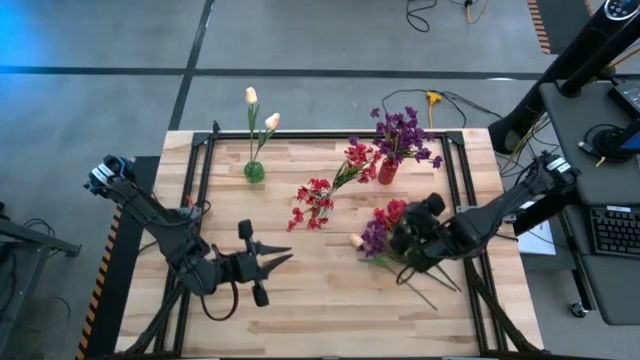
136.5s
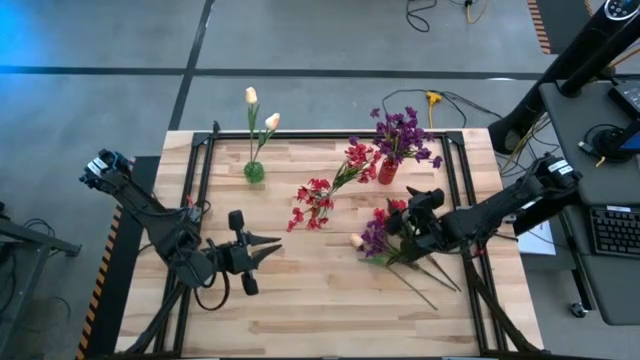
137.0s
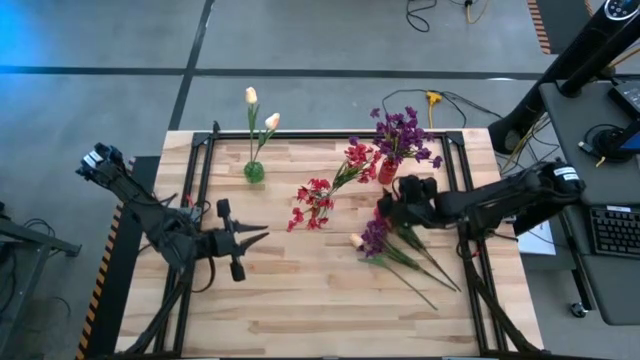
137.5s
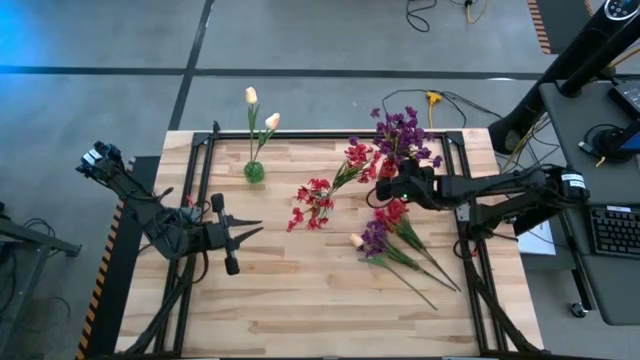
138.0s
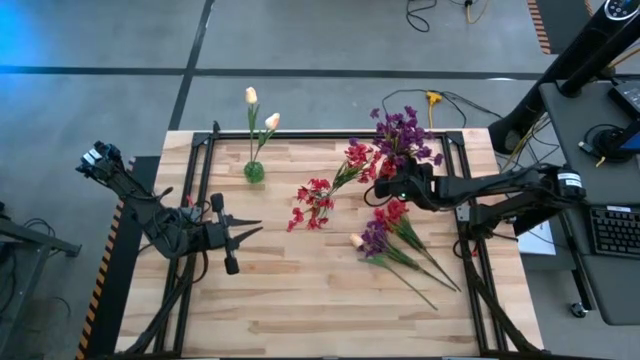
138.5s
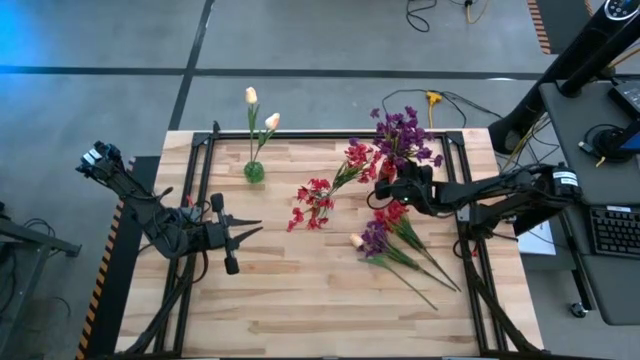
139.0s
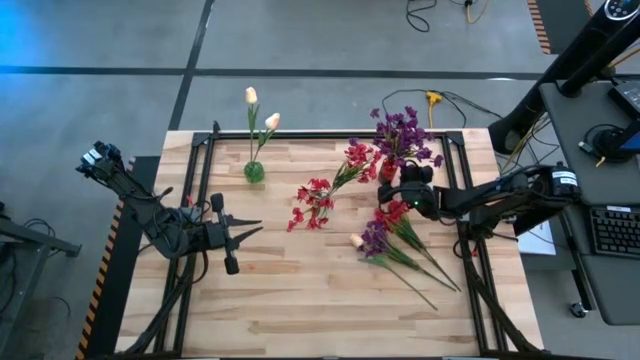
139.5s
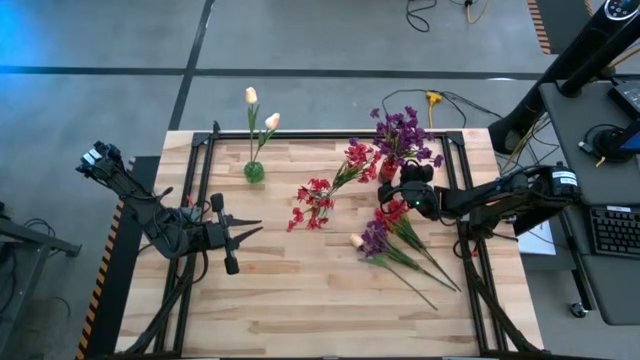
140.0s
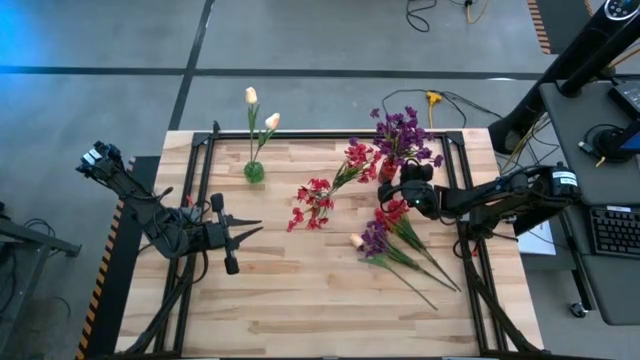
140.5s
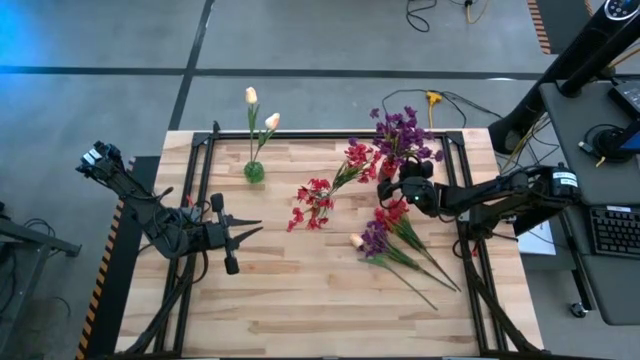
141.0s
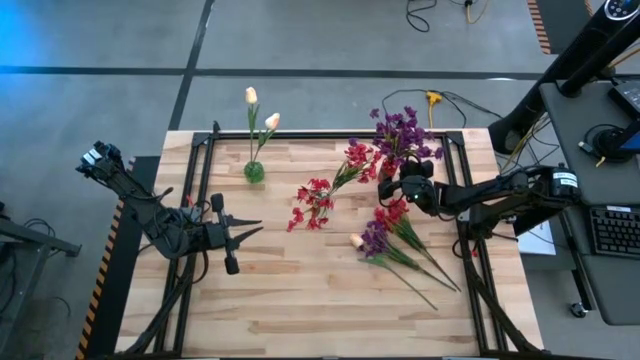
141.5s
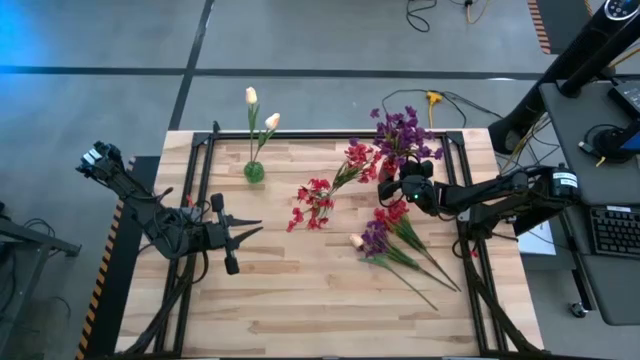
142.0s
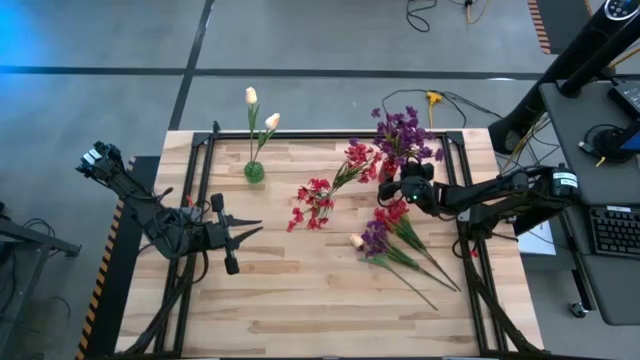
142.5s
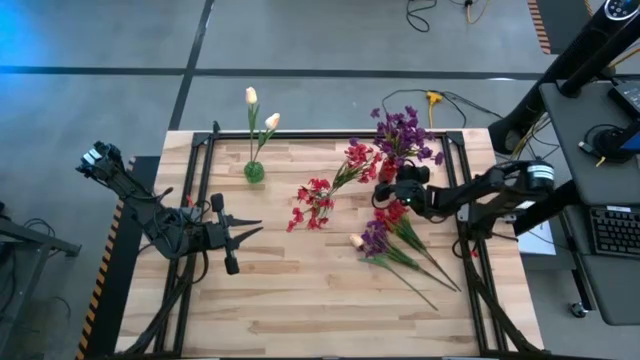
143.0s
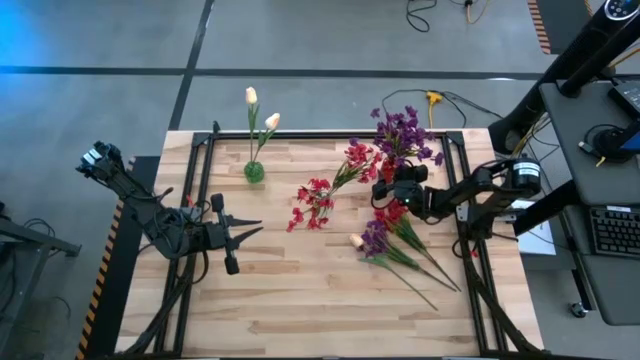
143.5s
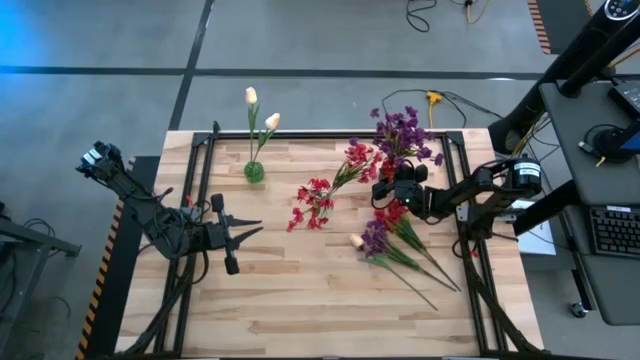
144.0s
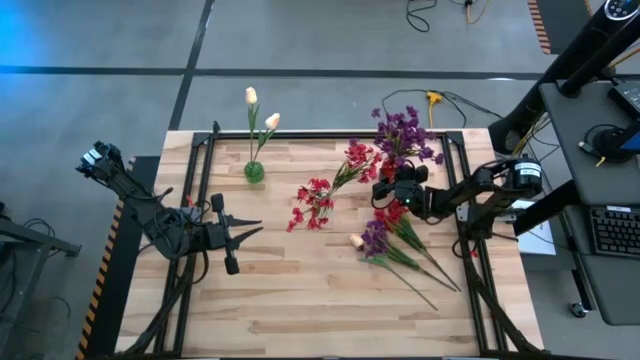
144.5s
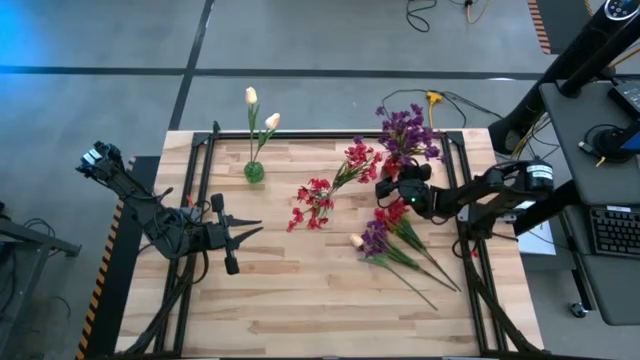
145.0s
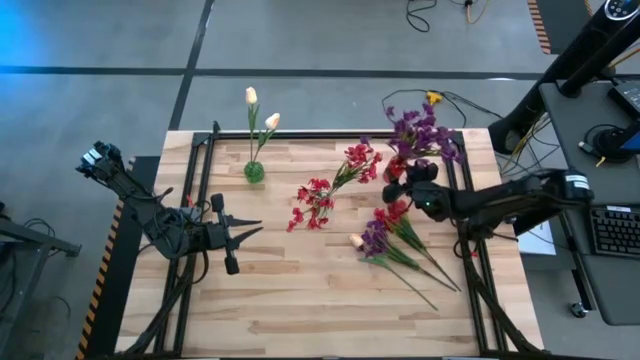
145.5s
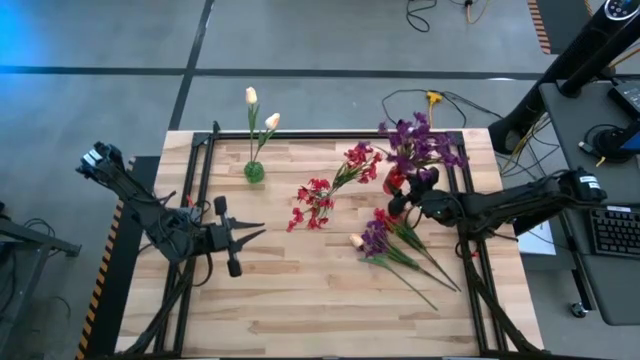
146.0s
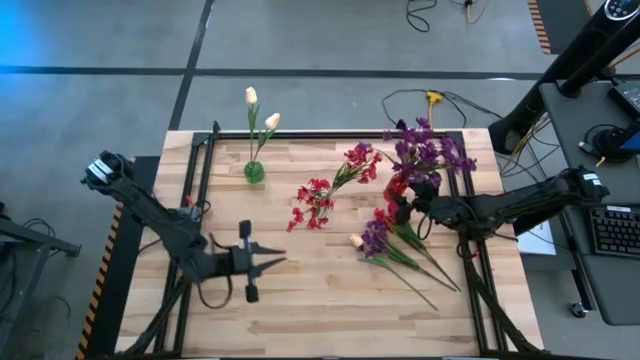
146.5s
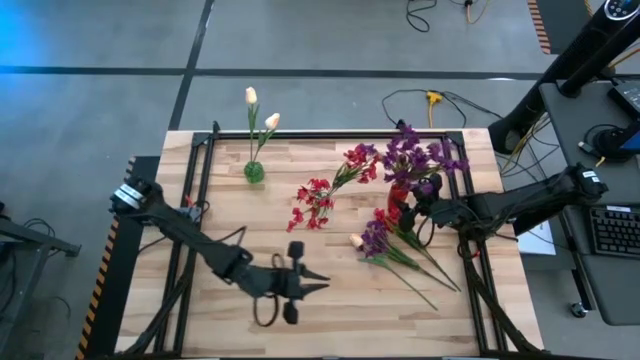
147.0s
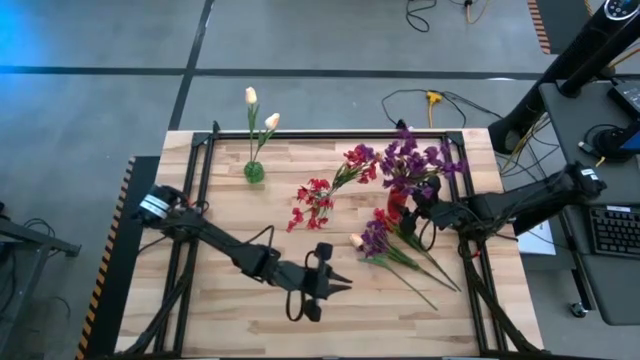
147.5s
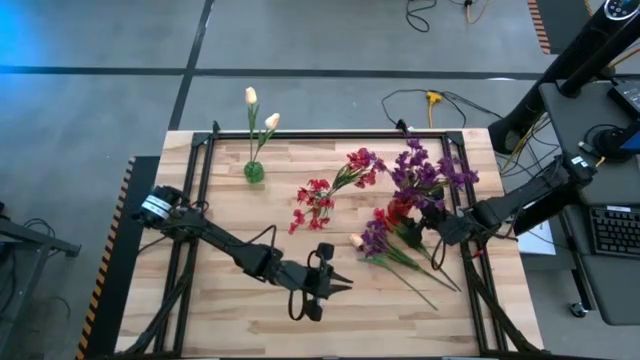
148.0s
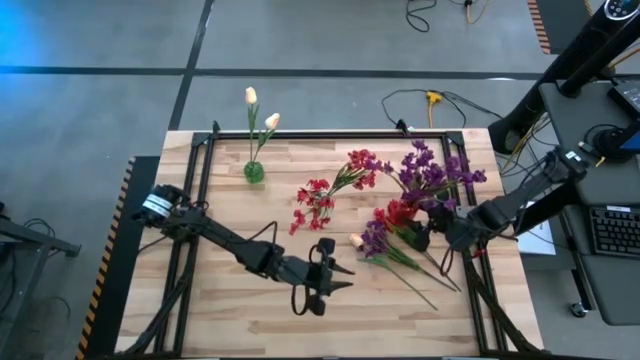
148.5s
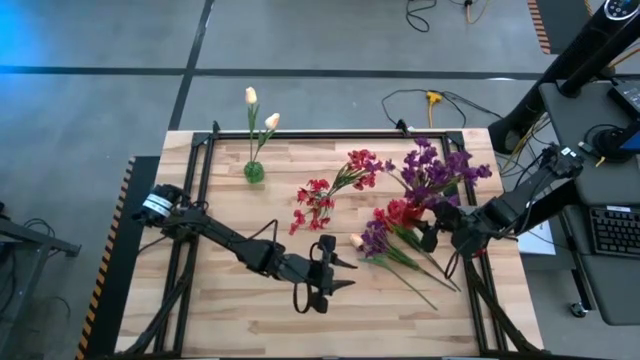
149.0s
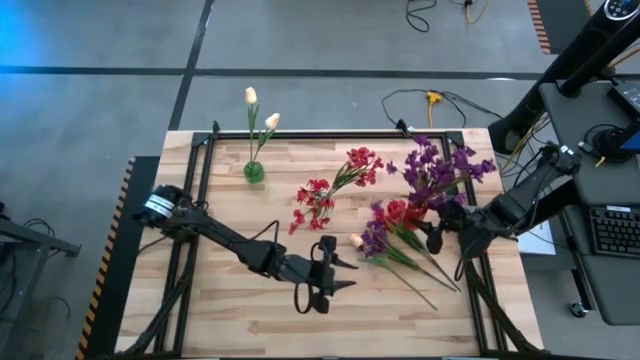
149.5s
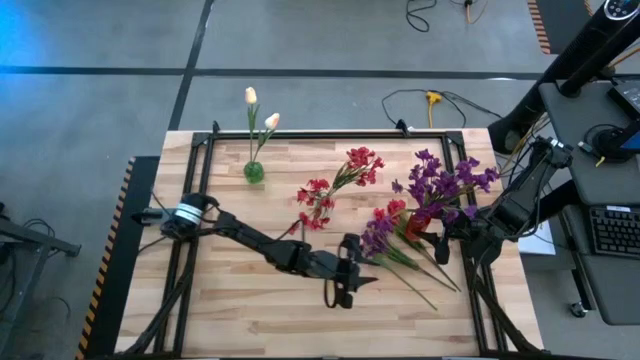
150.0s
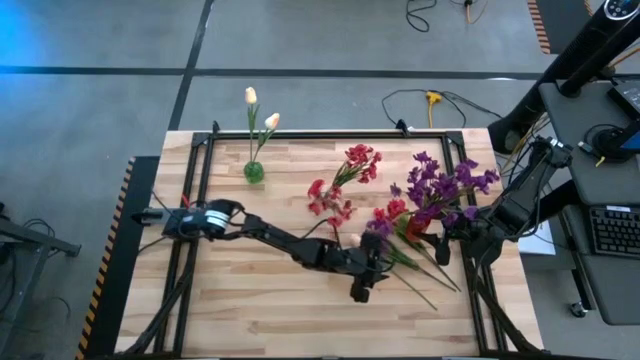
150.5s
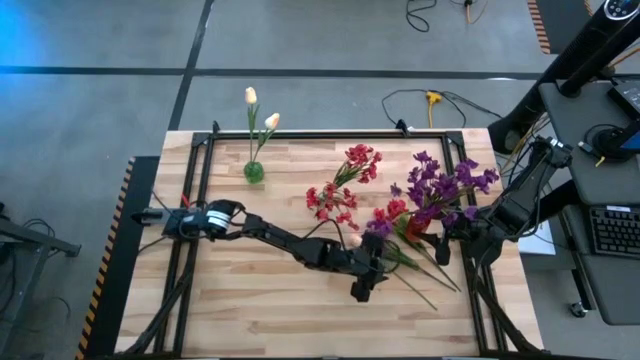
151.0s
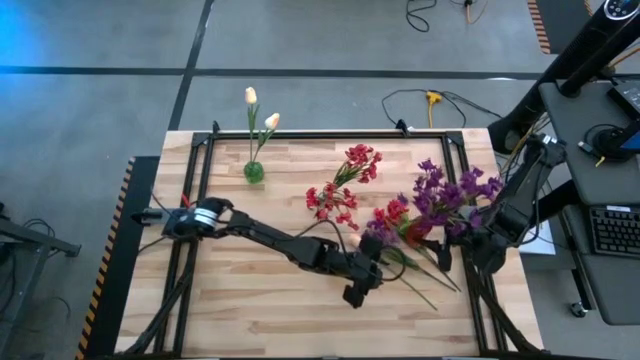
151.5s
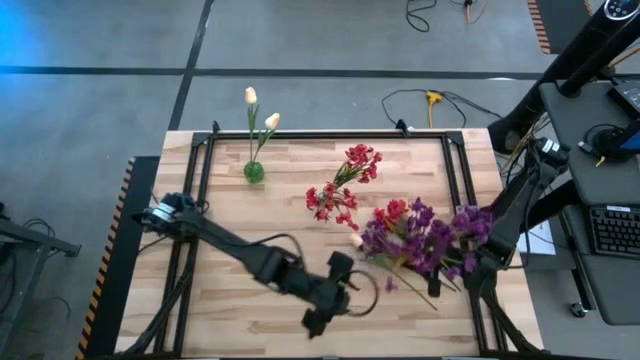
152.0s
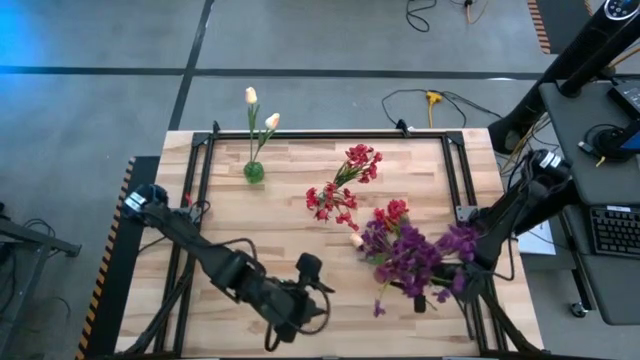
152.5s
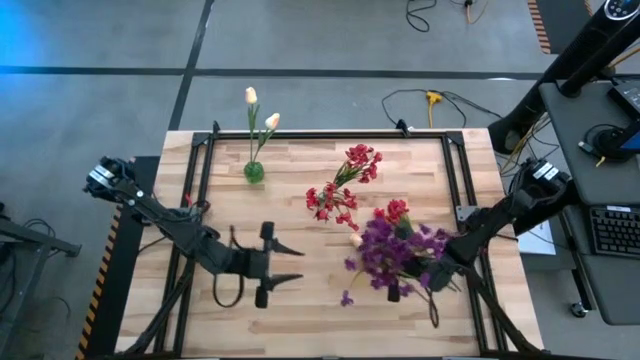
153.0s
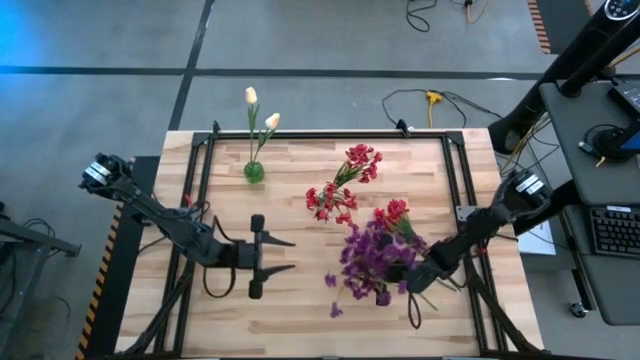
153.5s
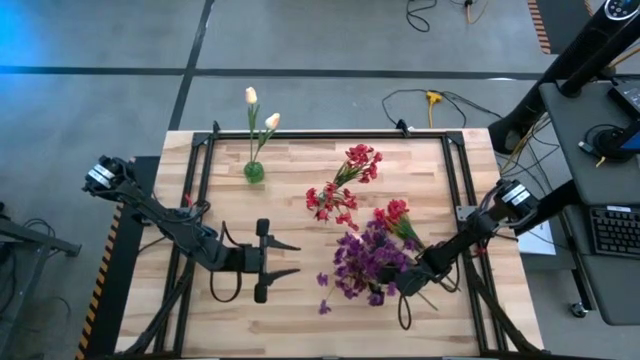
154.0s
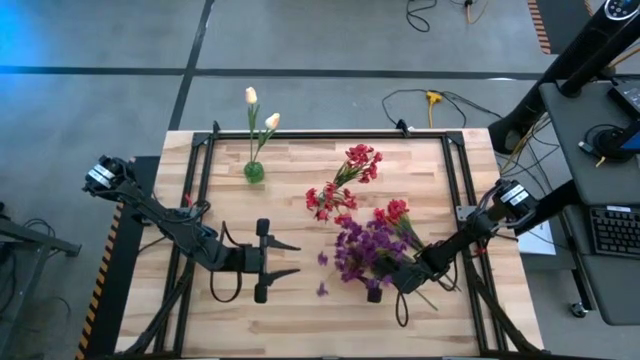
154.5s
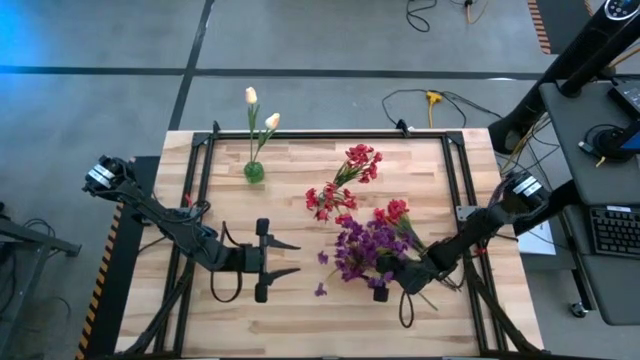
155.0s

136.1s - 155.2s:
Task: Sort flowers into vase by color
Move the red vase to the center of the table

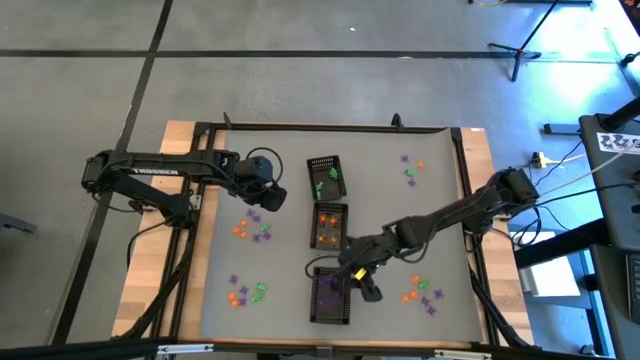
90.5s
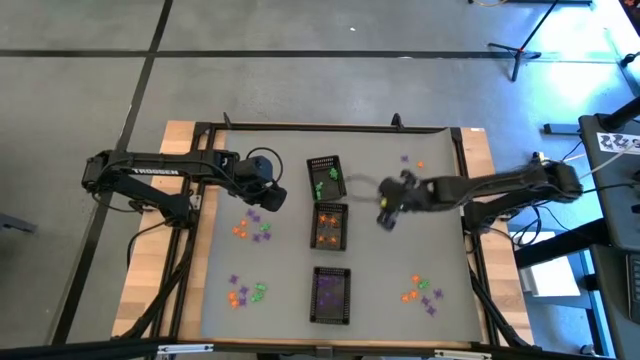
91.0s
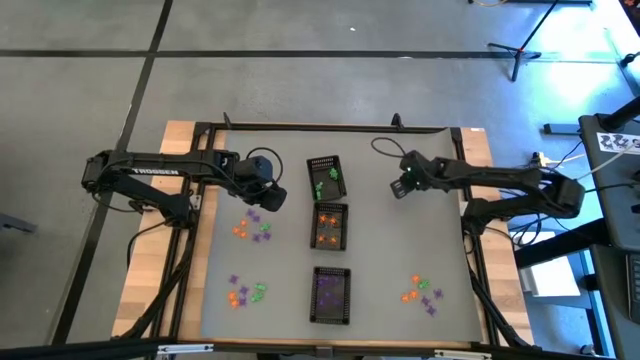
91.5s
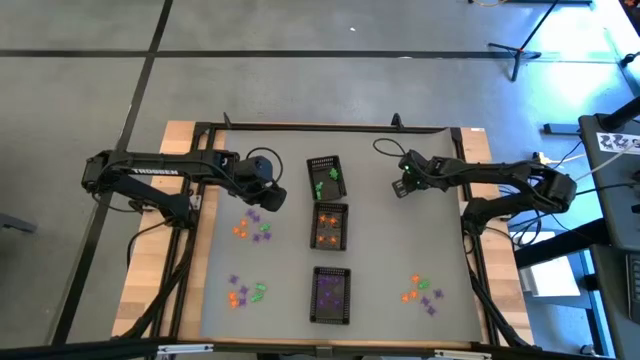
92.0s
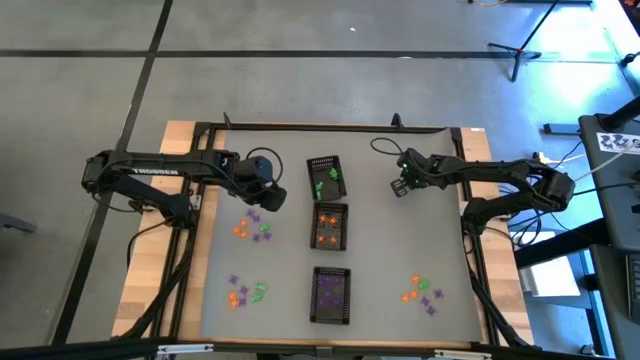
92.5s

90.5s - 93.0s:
Task: Sort Halloween decoration
Put the violet spider toy into the bottom black bin
